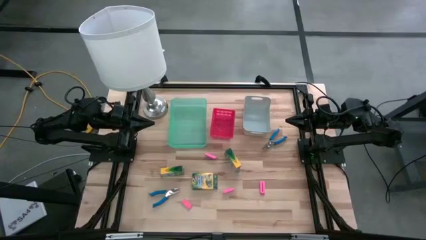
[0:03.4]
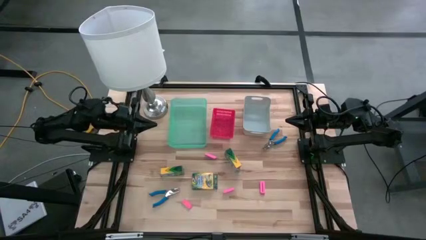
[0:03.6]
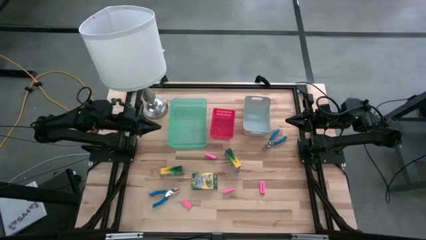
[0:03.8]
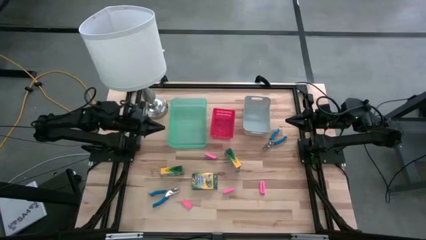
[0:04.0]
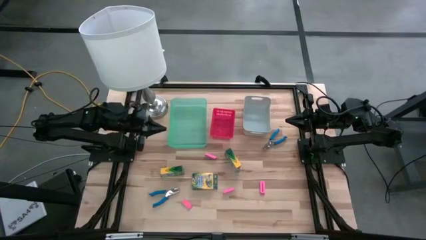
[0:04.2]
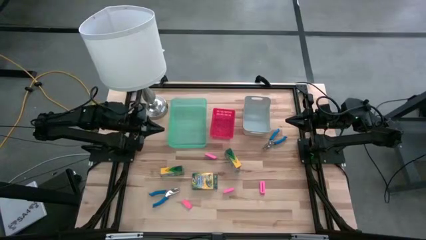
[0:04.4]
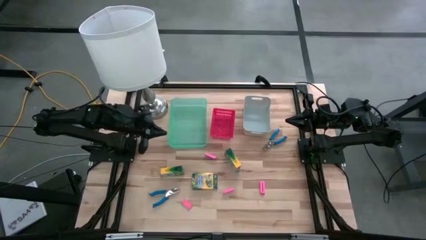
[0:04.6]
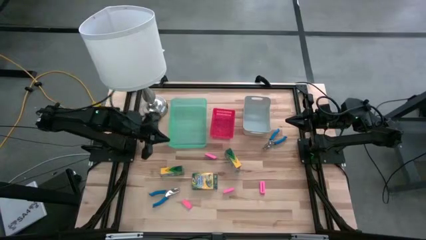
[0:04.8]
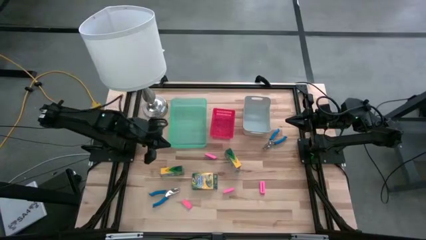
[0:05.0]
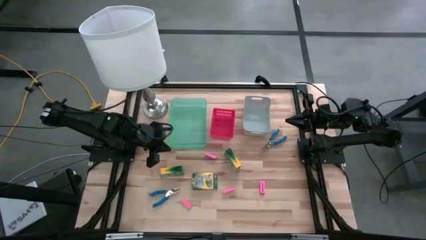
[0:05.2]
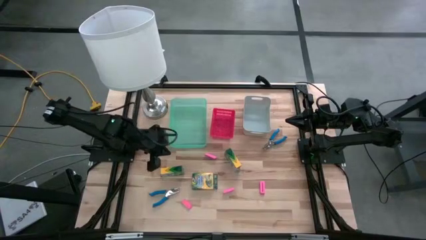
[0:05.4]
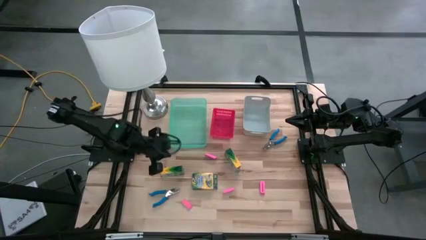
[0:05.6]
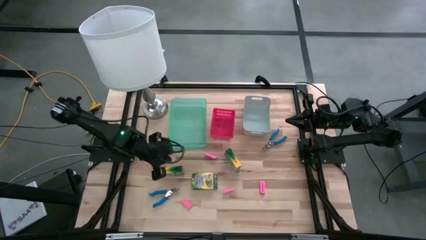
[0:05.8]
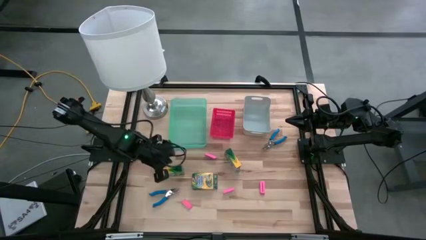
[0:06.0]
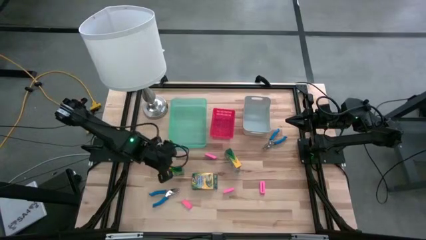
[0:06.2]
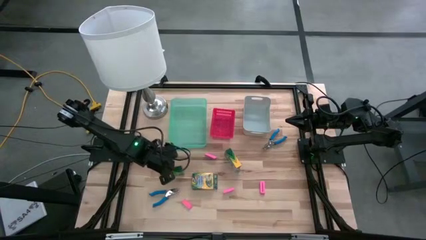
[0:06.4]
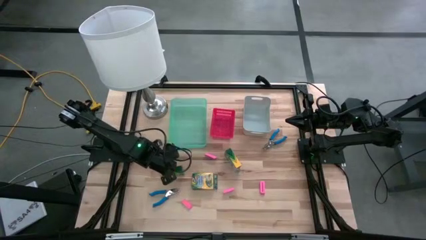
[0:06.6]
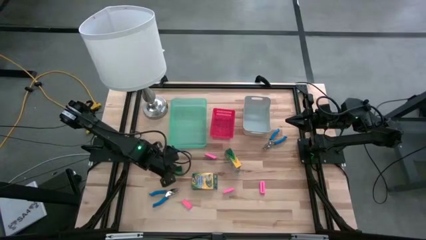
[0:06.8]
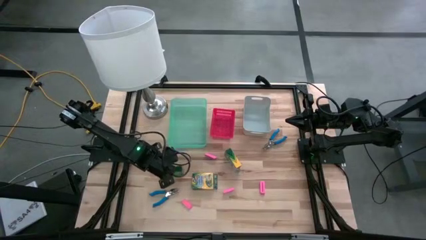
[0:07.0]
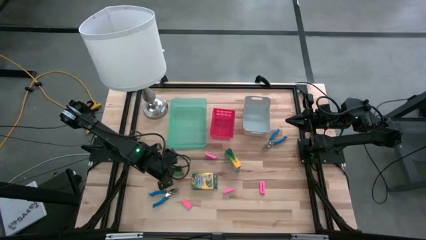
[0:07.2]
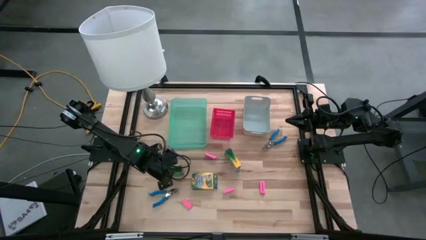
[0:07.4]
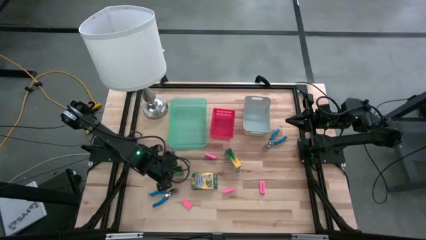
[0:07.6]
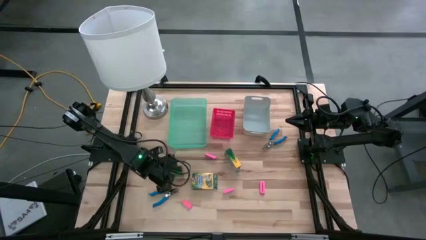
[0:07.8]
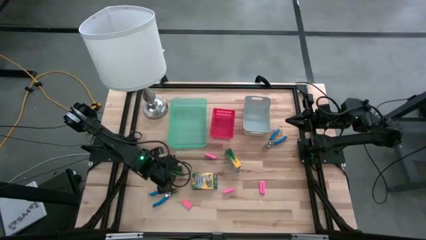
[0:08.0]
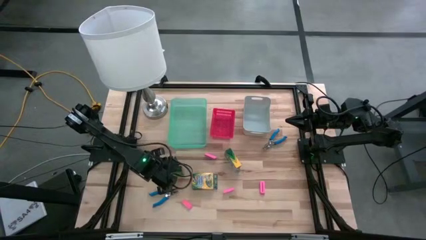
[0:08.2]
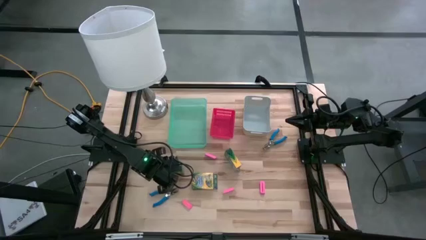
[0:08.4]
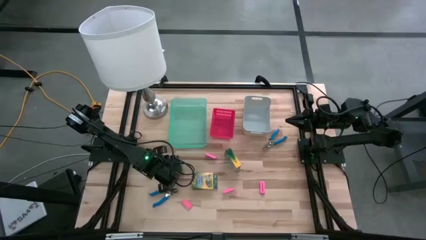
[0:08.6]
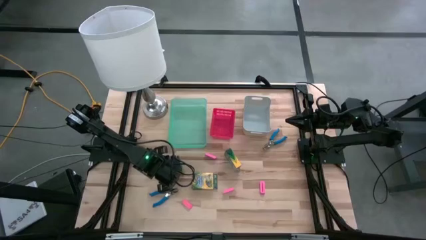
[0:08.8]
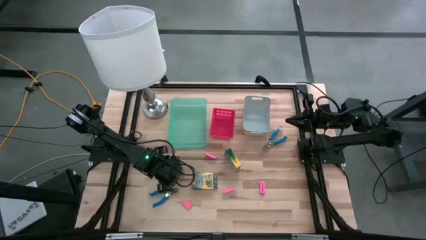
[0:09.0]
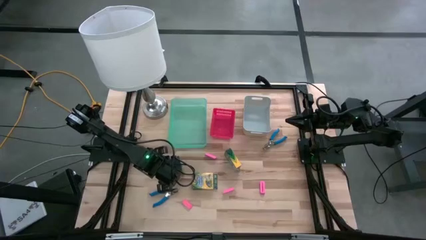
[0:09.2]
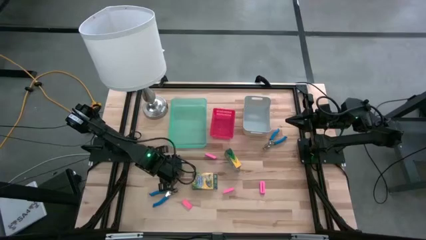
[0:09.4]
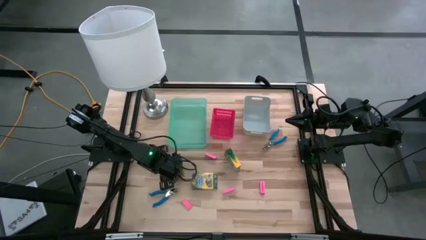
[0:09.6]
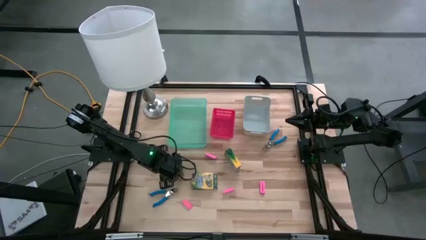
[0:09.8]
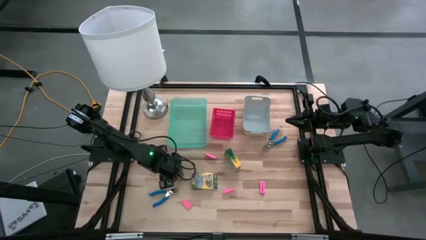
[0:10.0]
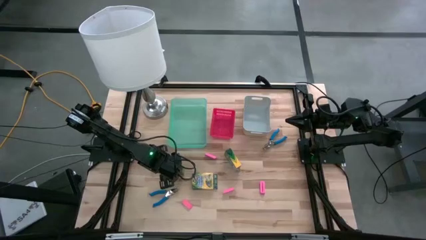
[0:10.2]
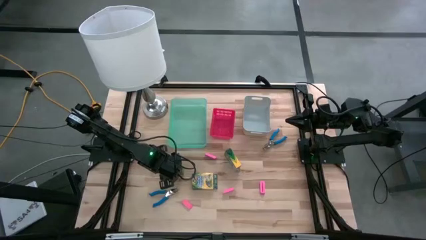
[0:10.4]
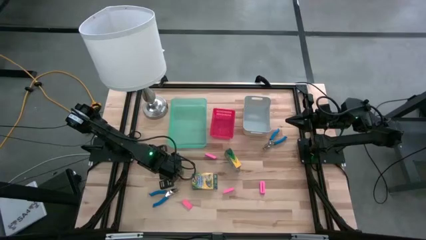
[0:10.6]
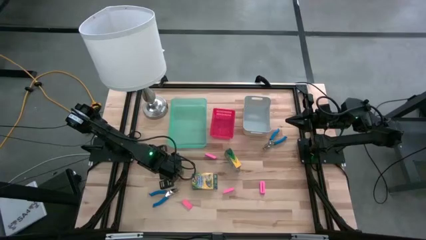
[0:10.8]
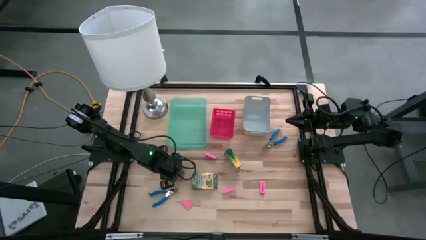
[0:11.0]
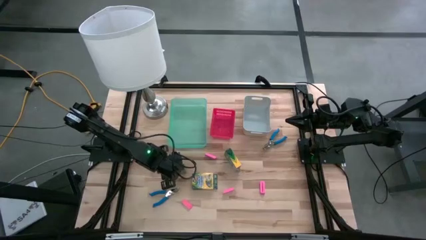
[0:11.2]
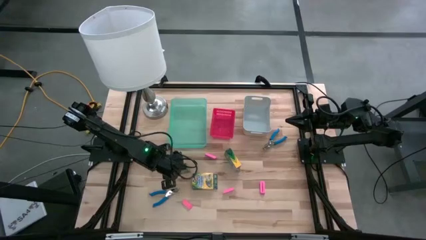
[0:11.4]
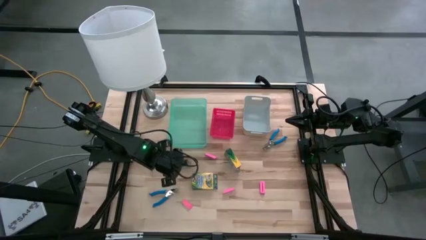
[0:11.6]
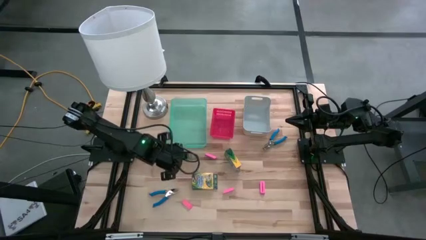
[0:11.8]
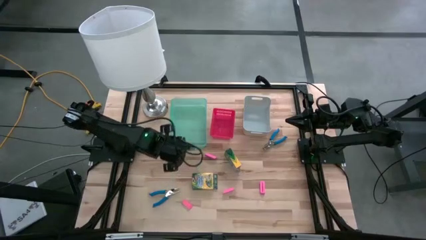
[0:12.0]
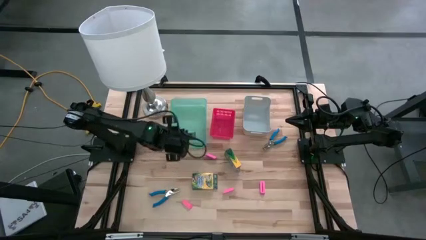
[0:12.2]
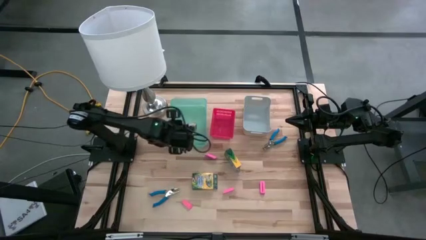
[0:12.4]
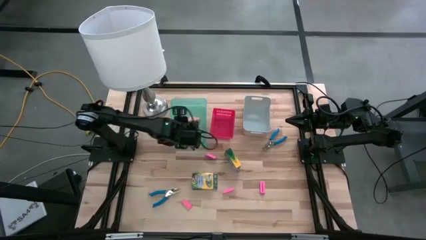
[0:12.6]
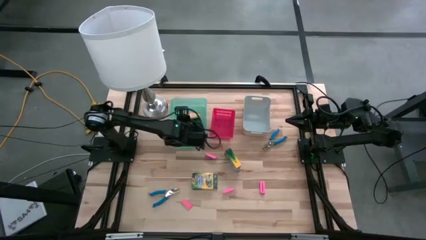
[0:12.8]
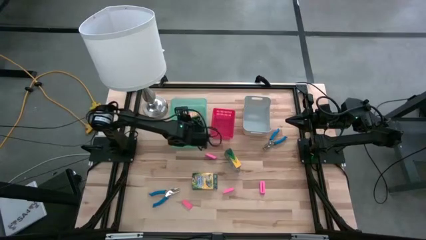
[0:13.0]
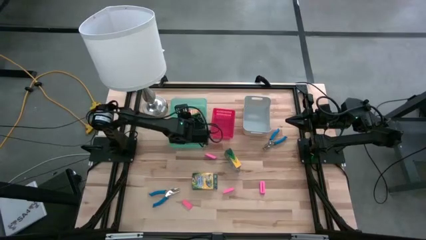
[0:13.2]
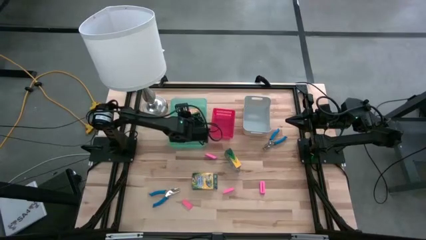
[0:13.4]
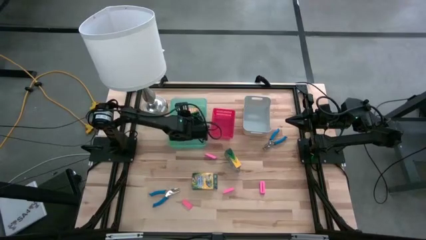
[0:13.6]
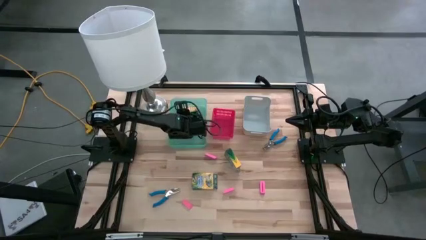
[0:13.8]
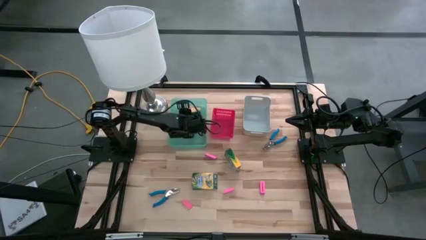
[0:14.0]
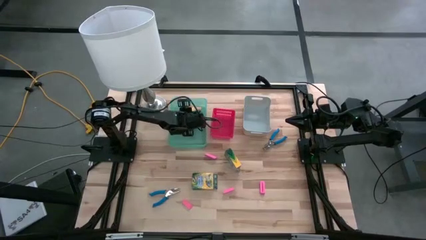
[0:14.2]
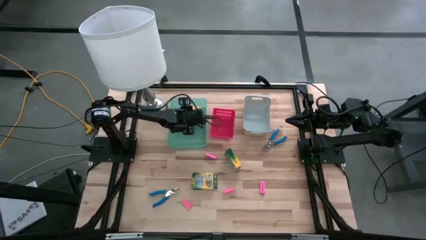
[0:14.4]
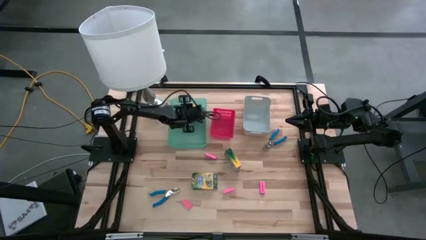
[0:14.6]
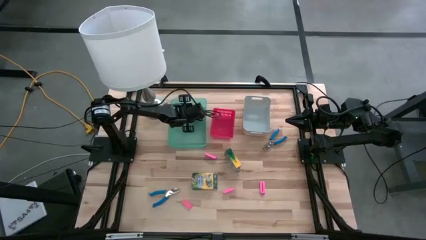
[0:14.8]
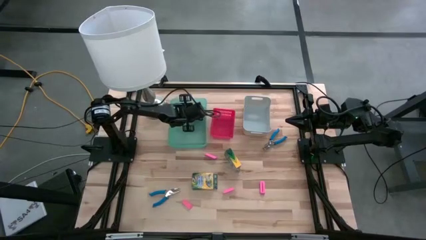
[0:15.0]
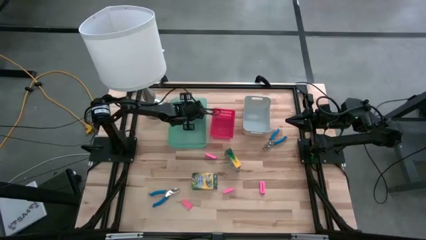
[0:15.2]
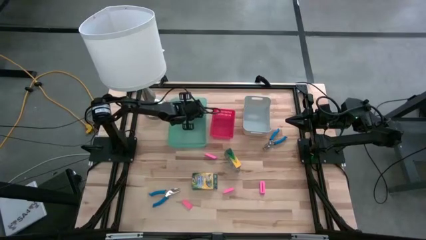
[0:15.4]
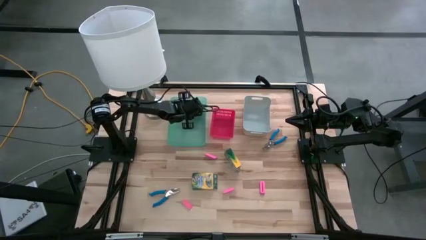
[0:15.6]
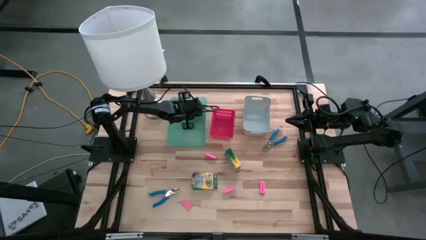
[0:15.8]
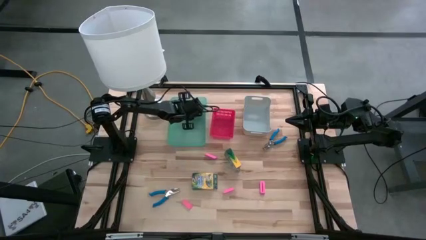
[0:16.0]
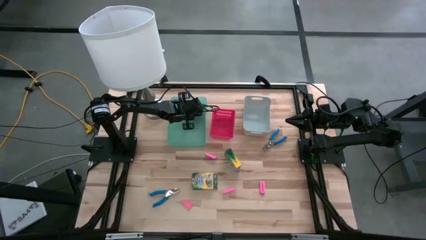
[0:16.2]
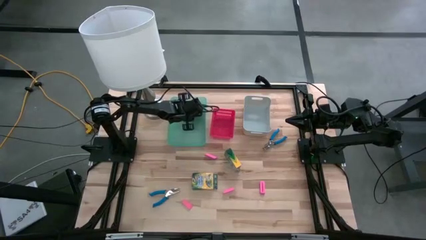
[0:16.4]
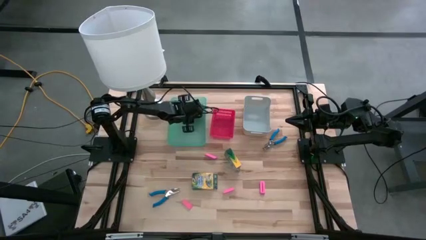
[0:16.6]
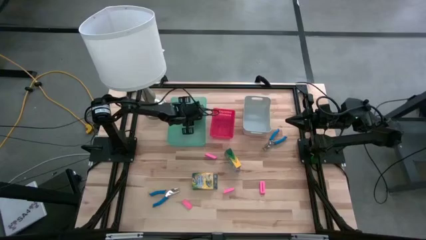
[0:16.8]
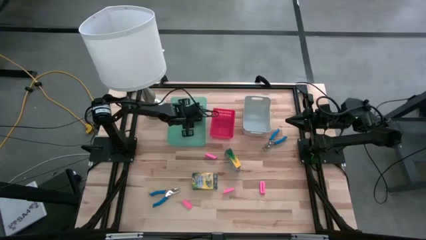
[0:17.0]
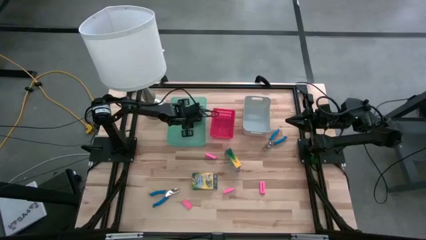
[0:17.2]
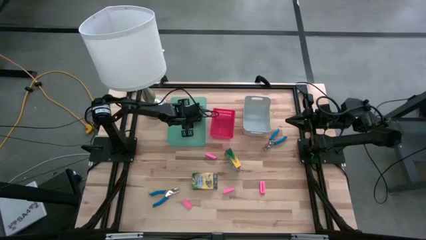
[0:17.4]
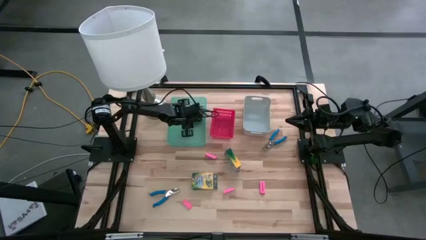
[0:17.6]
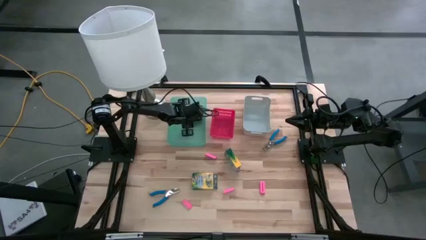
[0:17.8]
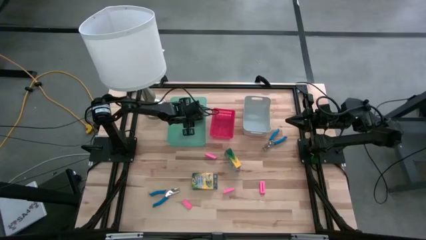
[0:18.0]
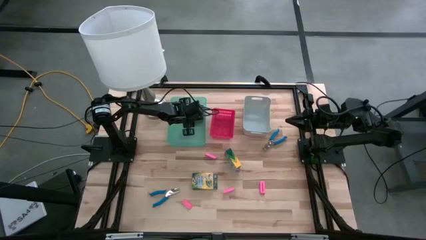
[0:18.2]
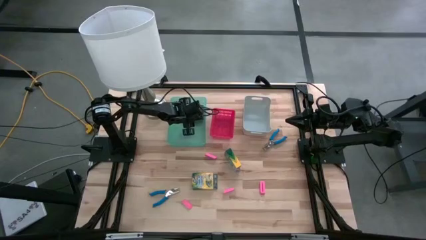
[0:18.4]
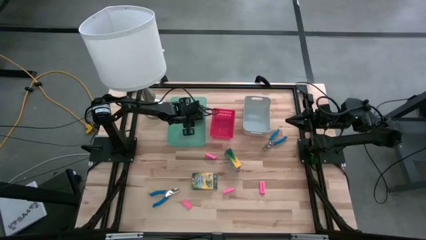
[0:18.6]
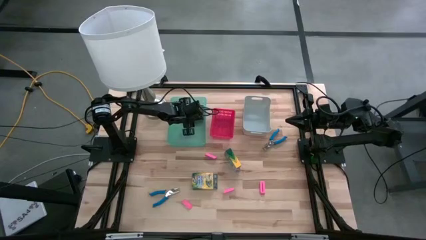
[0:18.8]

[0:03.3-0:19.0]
Task: Pick & Place School Supplies
Put the yellow crayon box into the green bin
